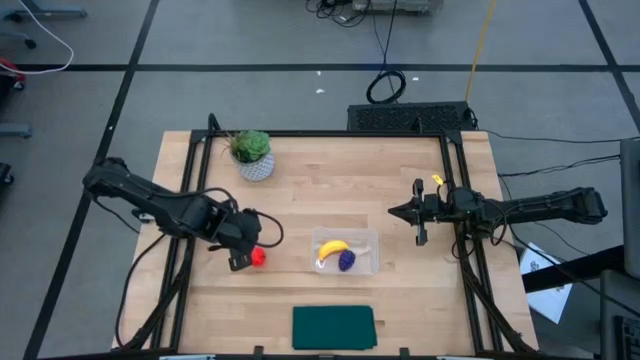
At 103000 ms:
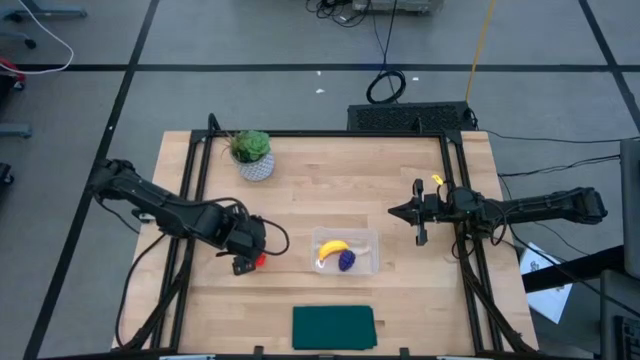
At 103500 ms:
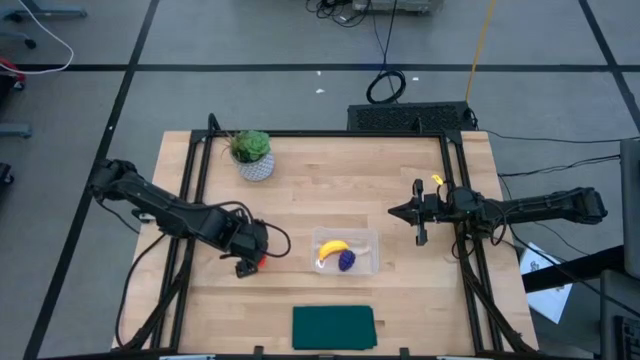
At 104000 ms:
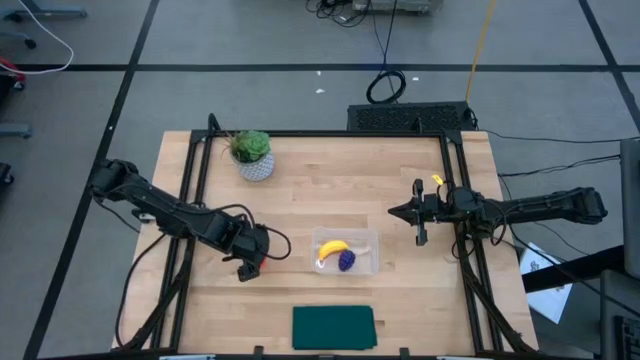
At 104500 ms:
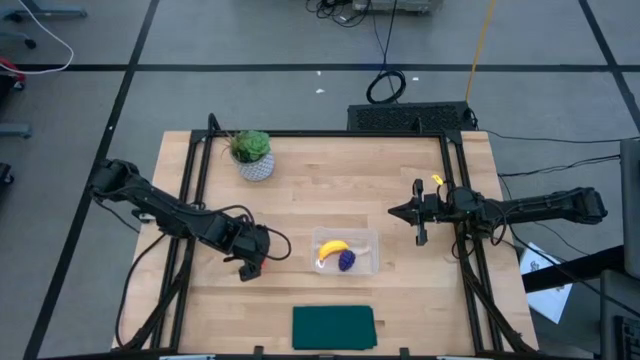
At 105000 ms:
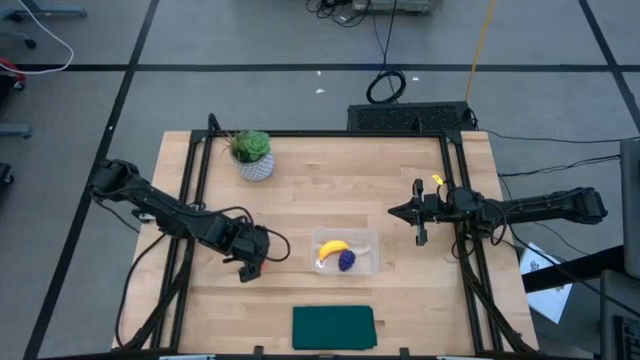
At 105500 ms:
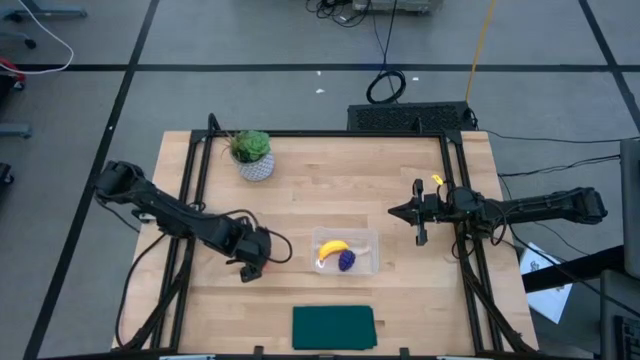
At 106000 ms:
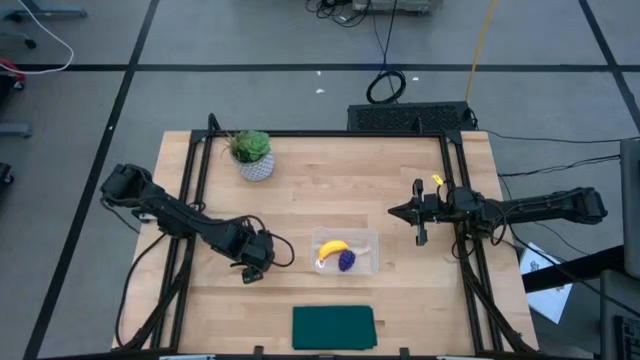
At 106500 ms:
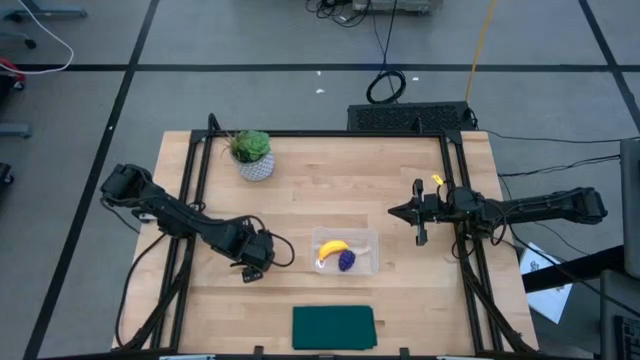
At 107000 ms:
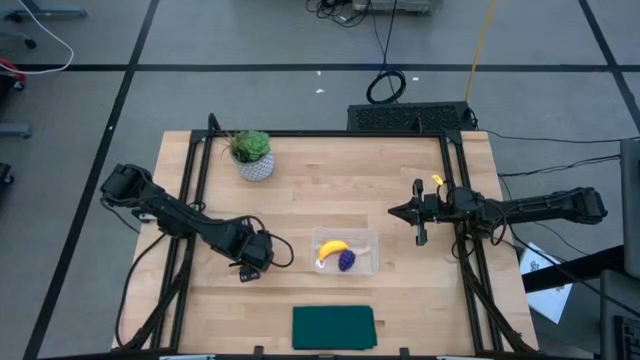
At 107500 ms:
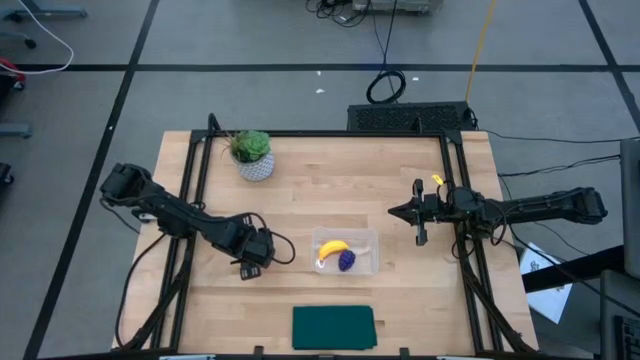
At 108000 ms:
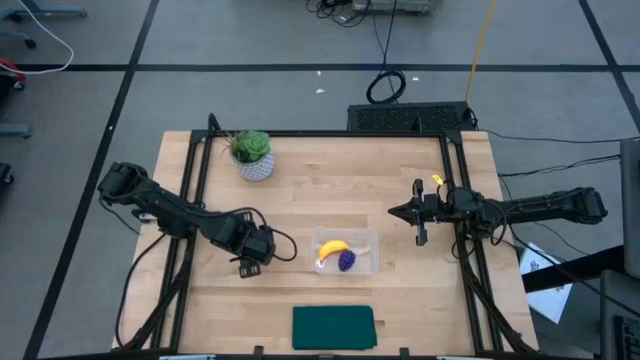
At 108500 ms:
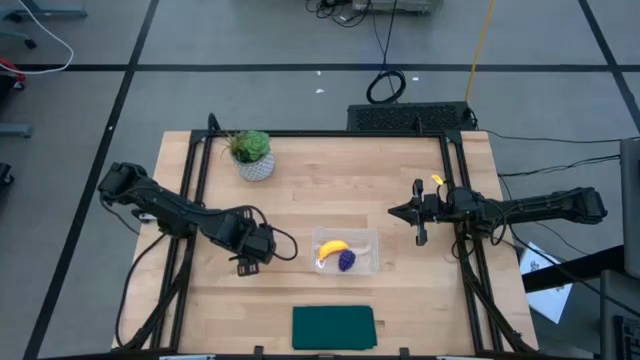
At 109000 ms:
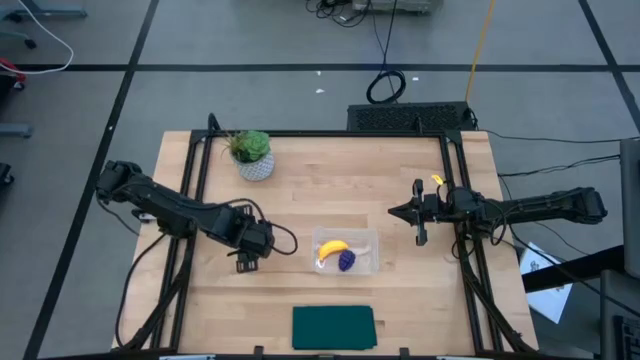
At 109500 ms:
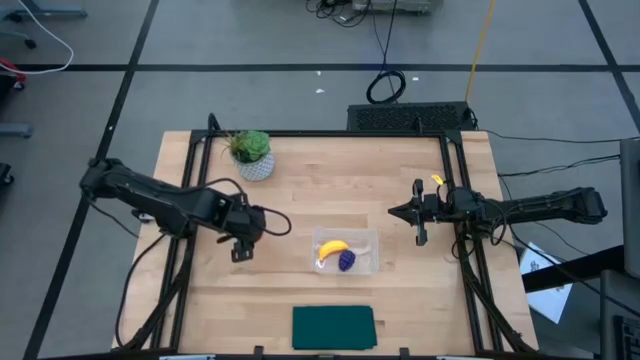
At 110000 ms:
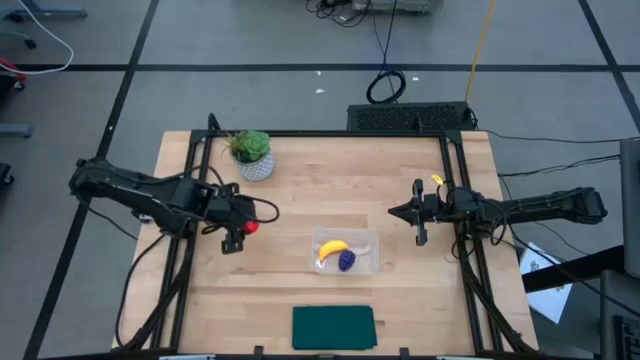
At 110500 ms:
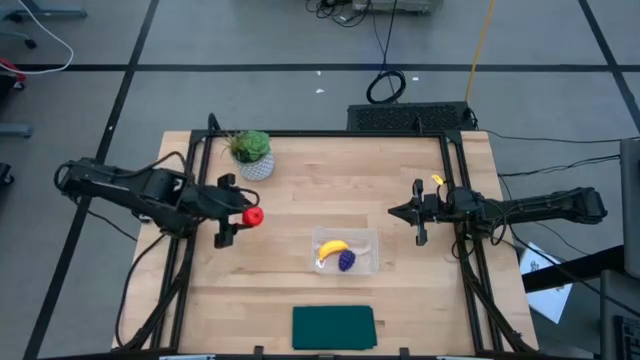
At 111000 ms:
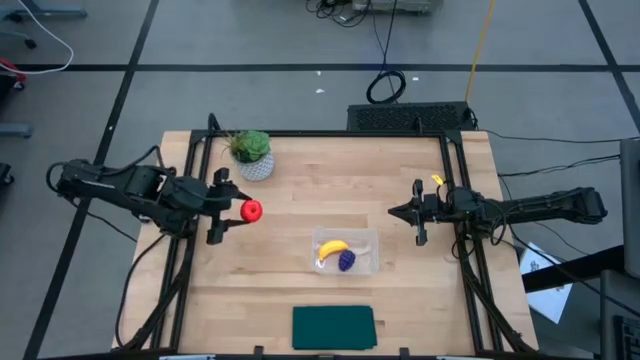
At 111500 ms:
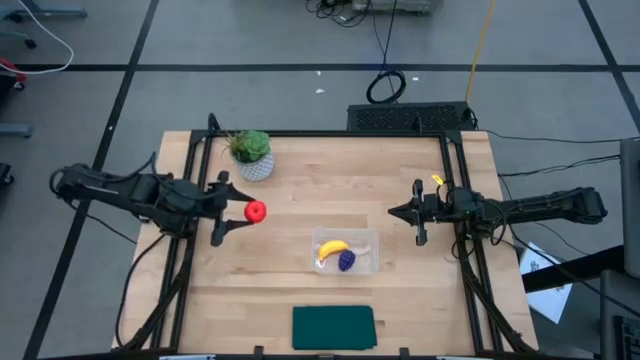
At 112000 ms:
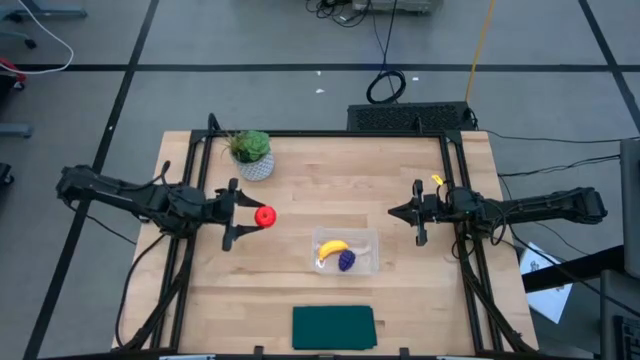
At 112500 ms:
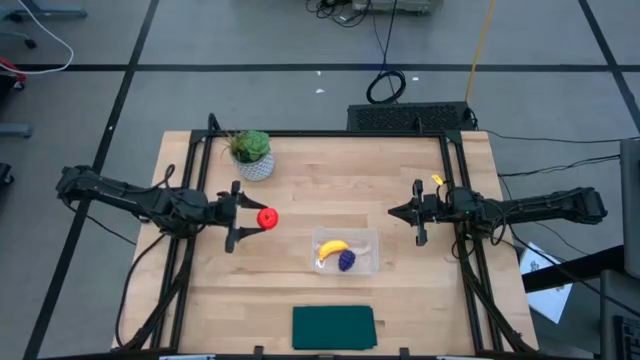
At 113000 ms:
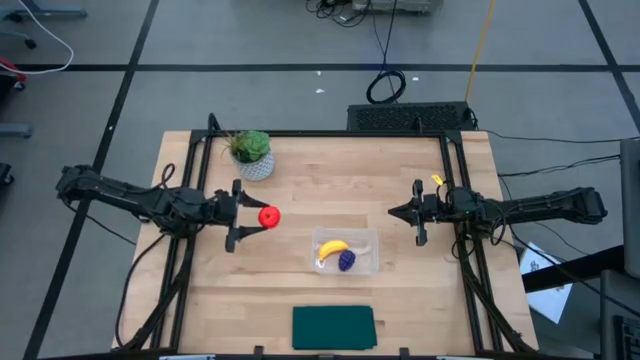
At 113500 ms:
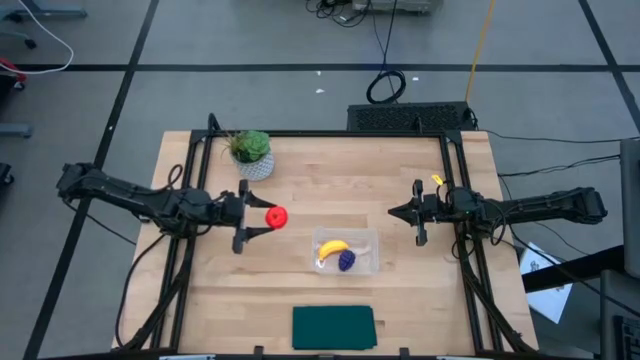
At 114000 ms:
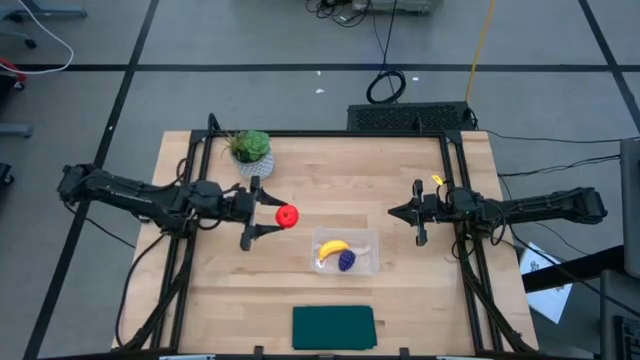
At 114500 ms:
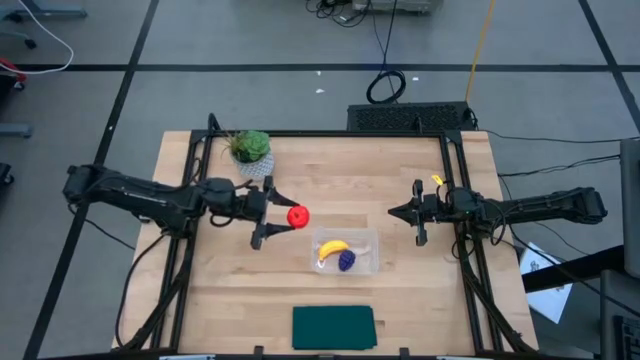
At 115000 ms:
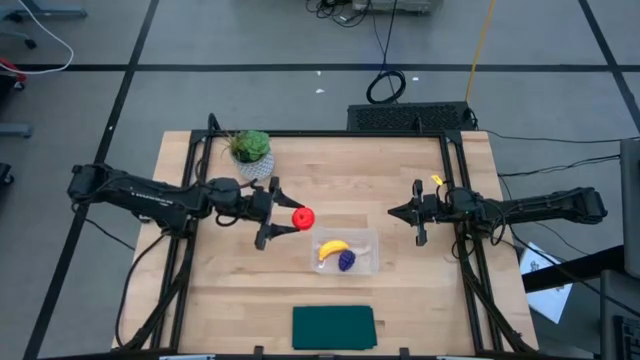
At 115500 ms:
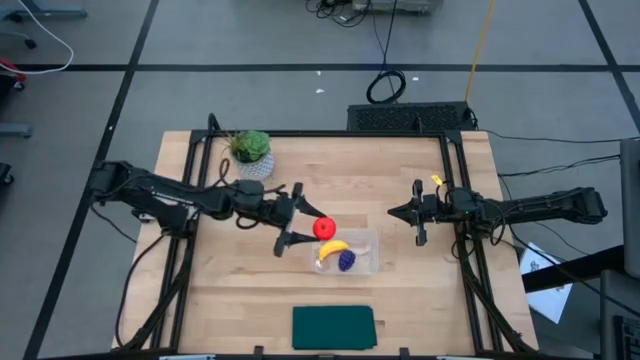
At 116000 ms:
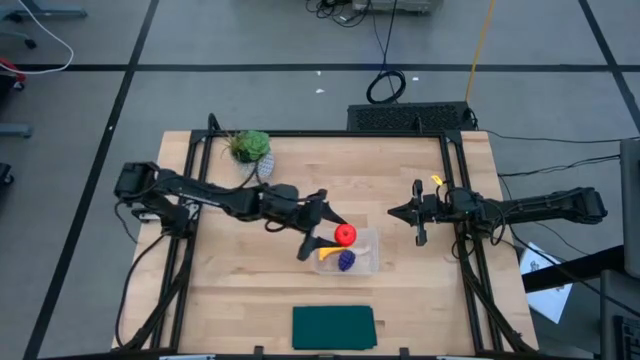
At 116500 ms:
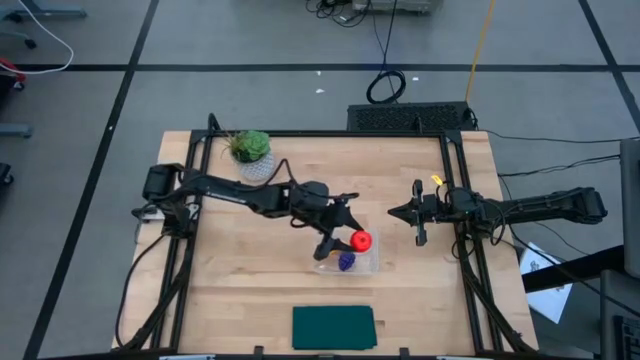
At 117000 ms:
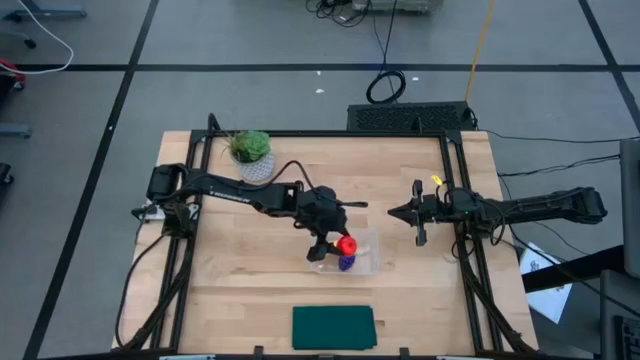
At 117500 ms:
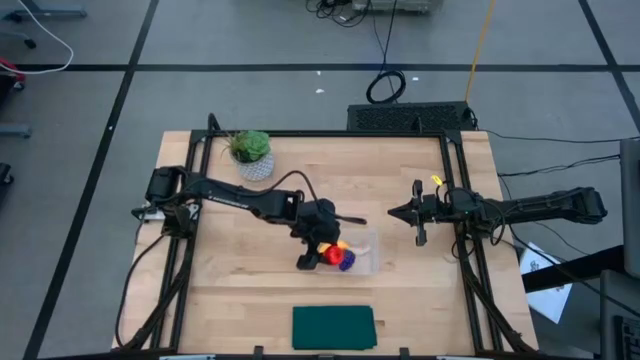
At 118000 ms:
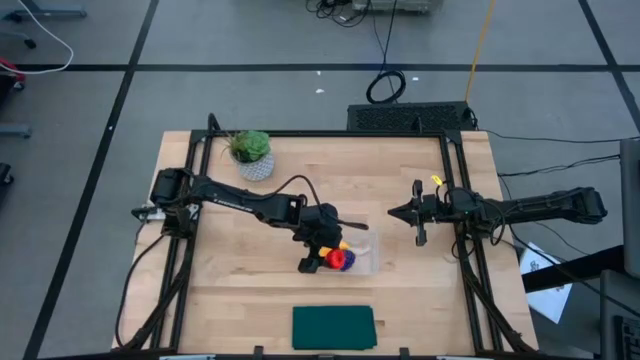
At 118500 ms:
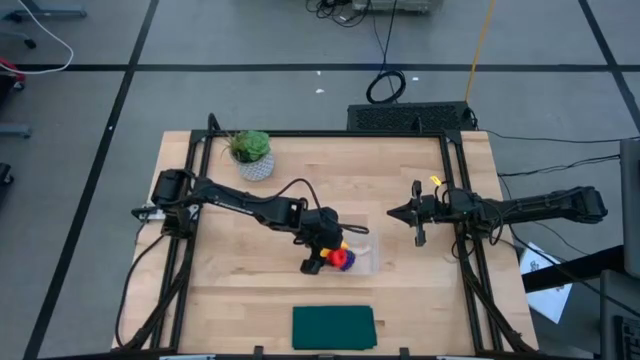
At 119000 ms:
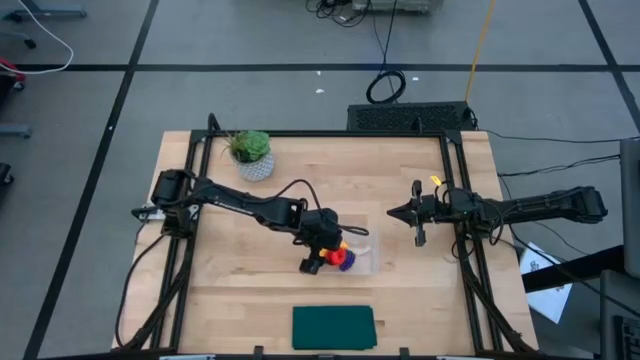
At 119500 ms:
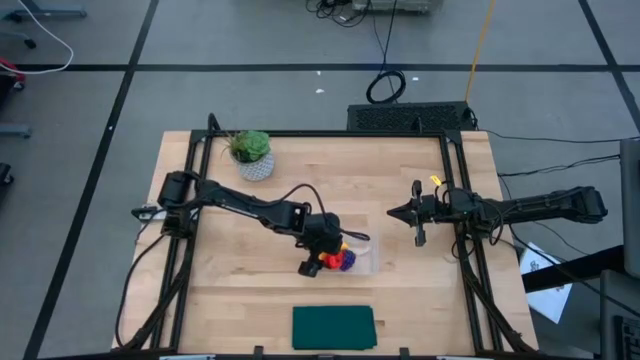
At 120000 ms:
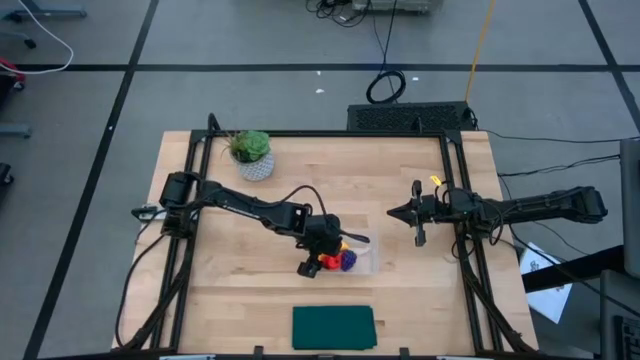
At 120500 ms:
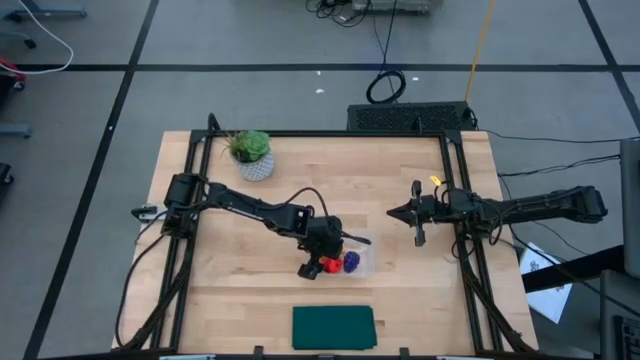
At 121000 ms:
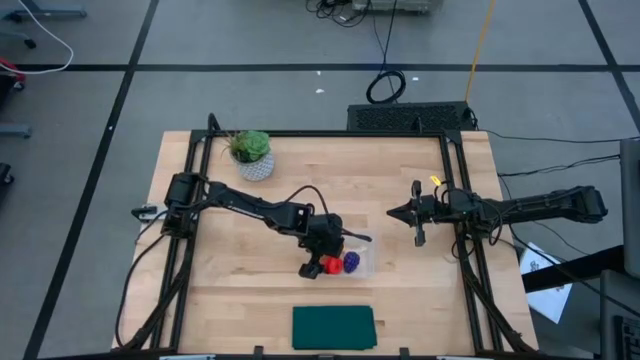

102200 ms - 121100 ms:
Task: Pick and placing Produce into tupperware
Put the apple into the transparent bin

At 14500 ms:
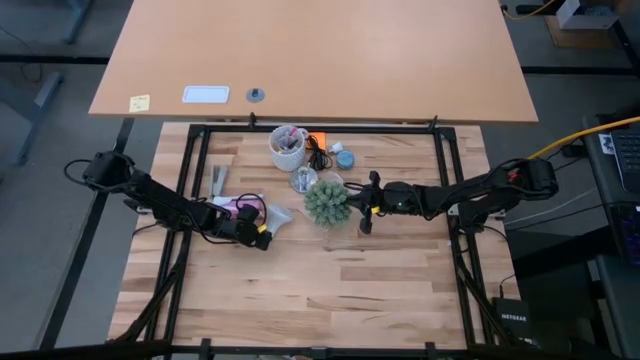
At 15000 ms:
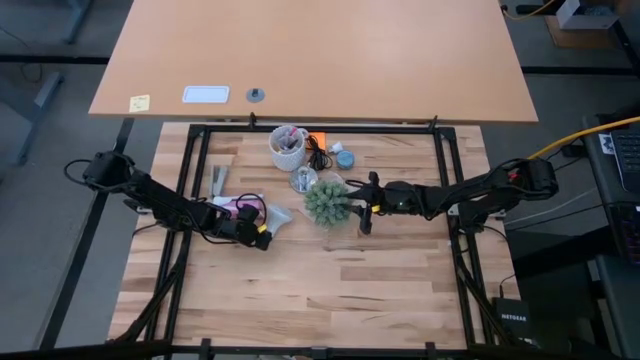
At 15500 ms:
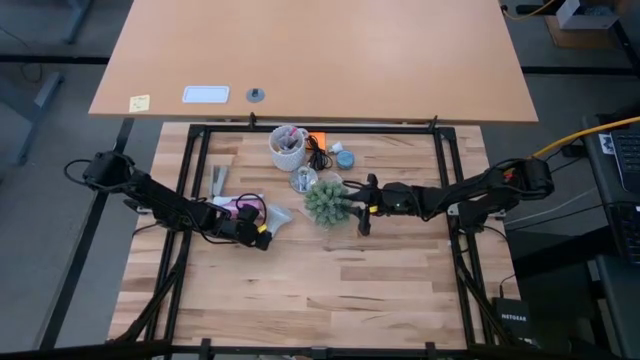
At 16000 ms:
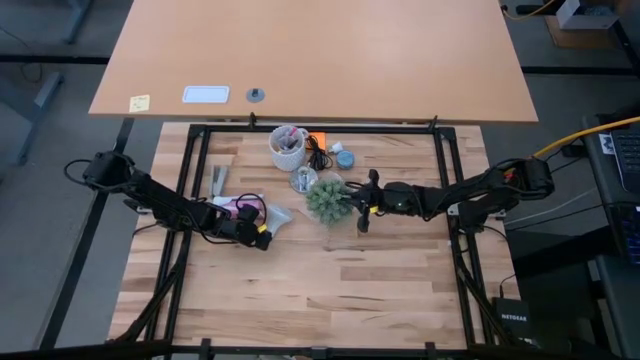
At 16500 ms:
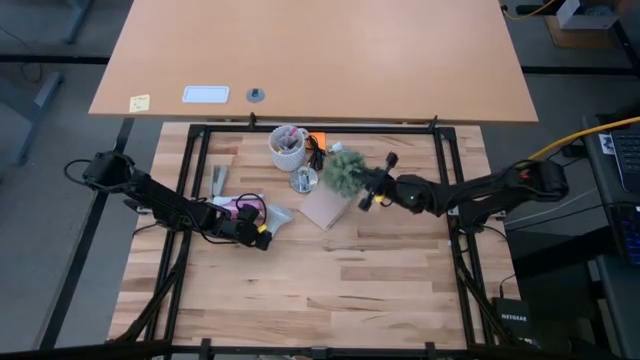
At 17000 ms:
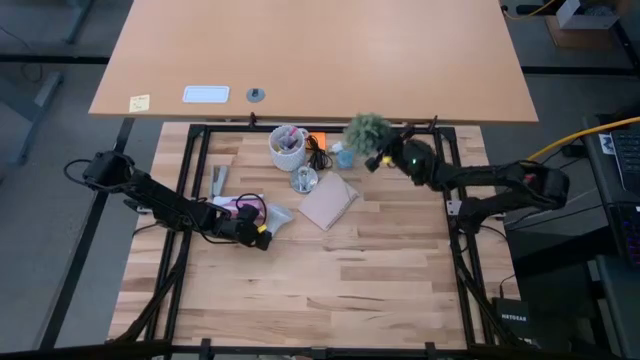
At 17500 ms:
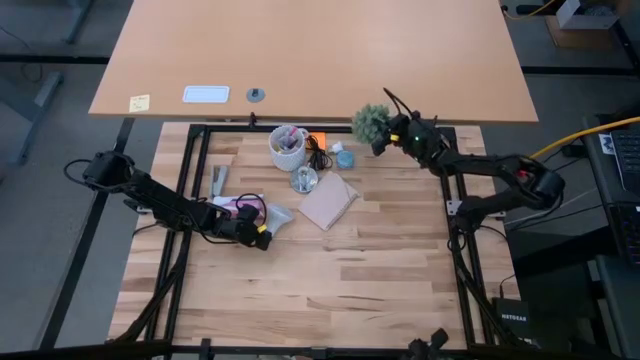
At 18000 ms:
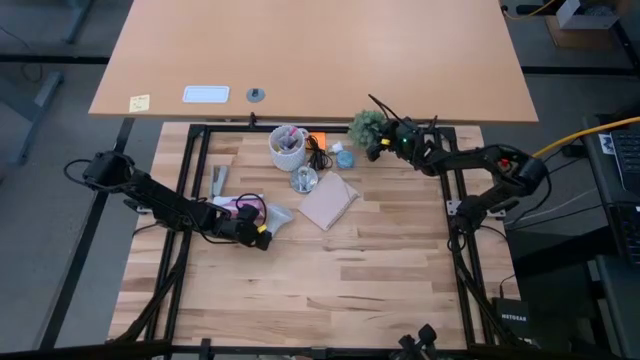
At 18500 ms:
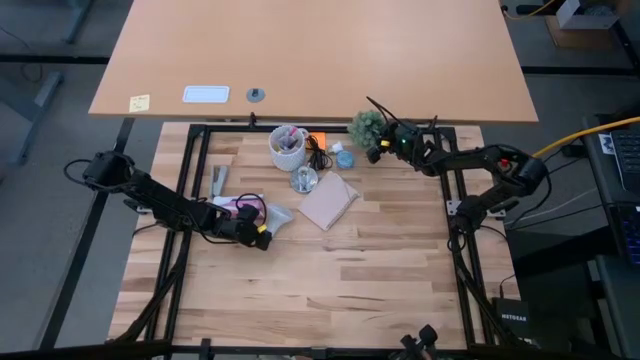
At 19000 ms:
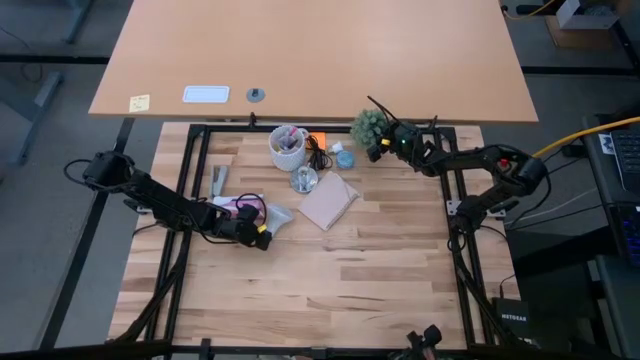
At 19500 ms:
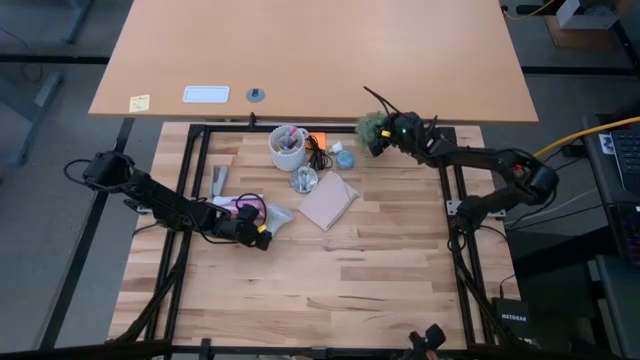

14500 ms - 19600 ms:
Task: Screw lightbulb
Move the gray vase plant to the top right of the table
